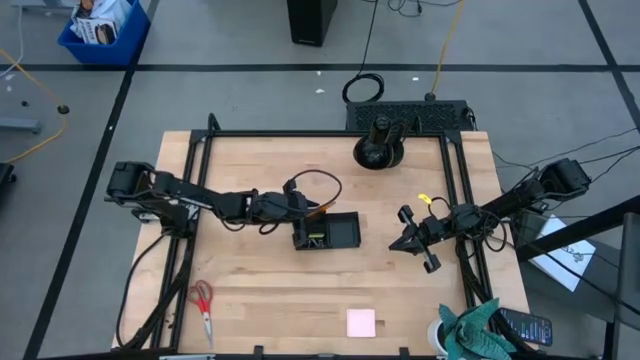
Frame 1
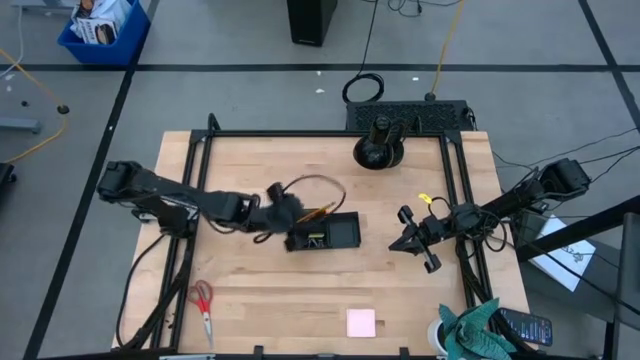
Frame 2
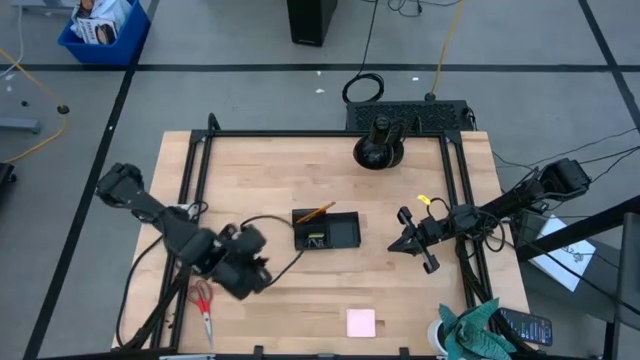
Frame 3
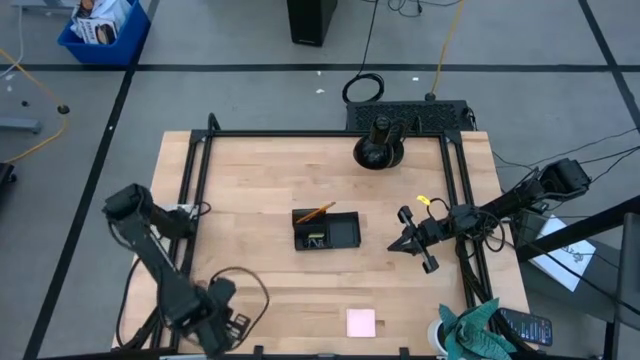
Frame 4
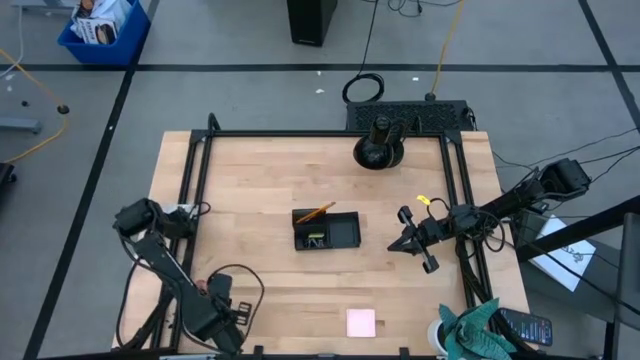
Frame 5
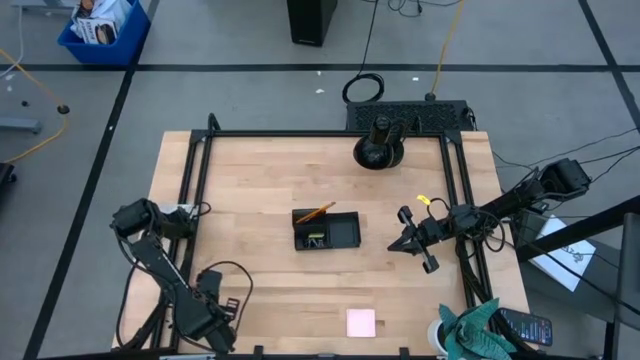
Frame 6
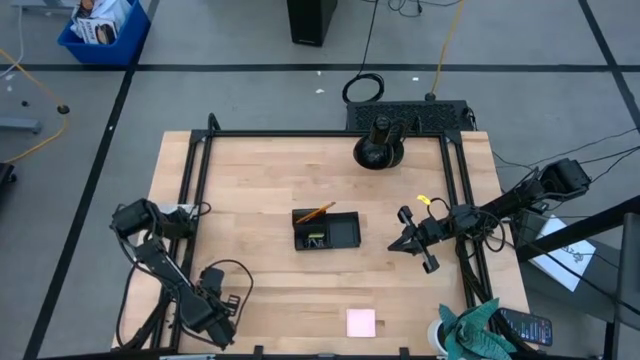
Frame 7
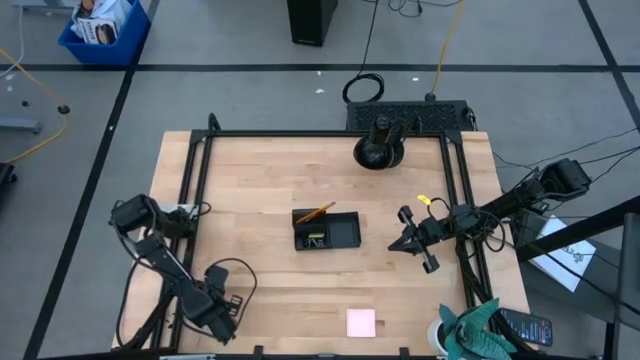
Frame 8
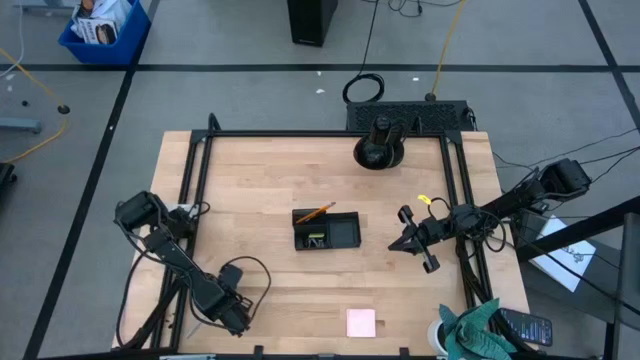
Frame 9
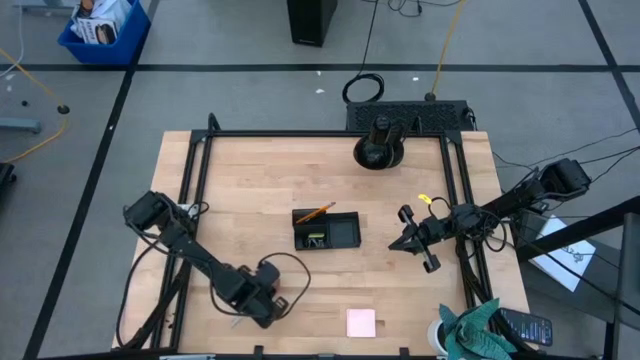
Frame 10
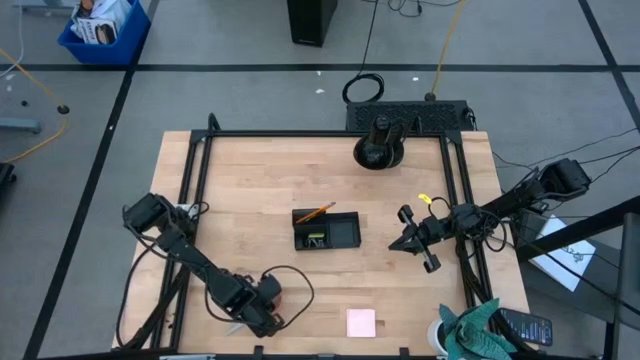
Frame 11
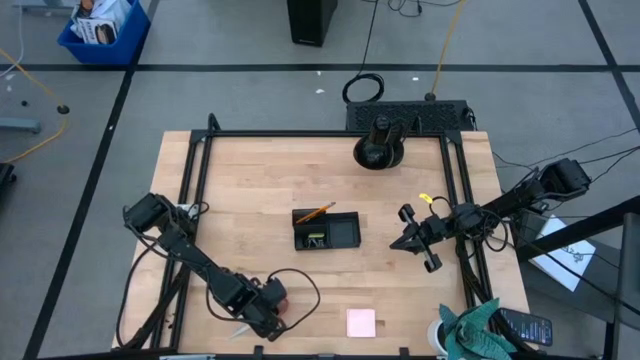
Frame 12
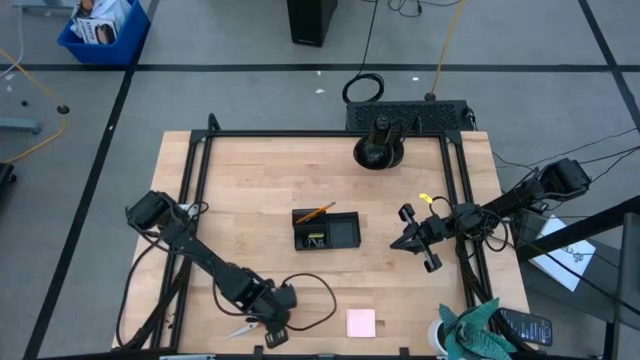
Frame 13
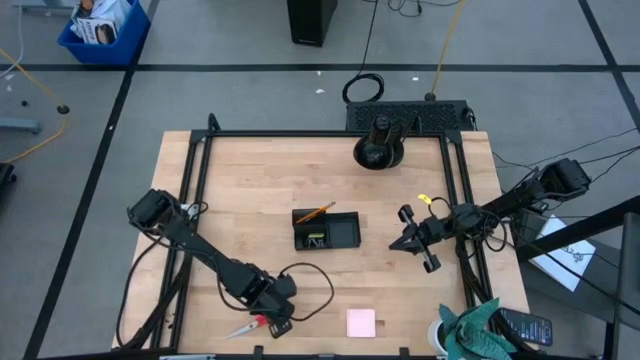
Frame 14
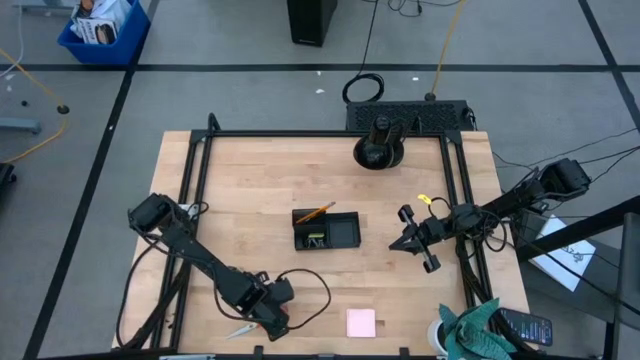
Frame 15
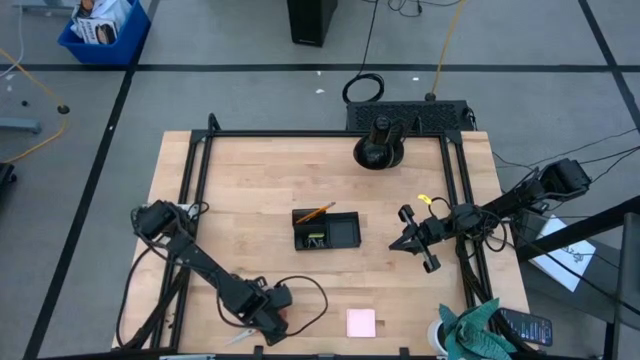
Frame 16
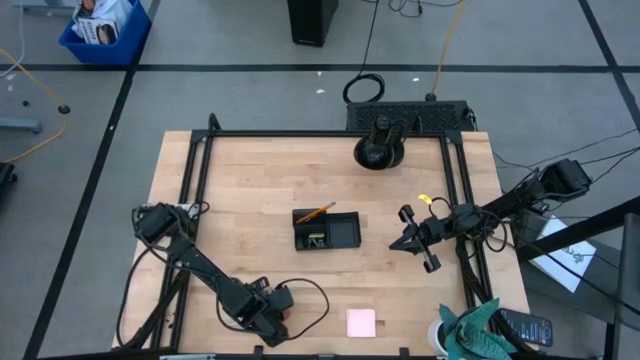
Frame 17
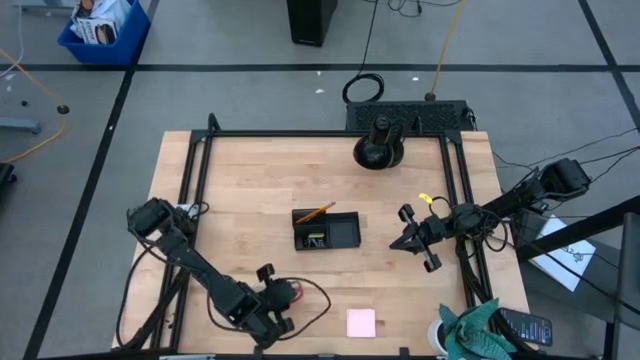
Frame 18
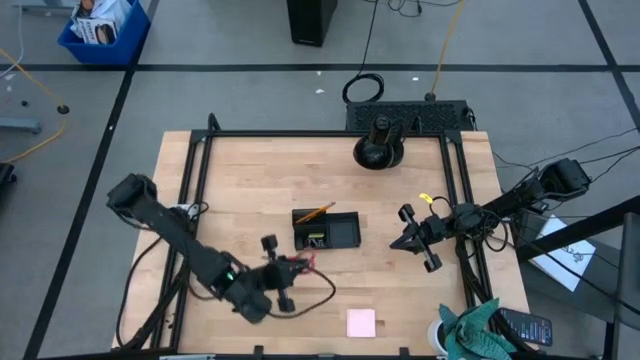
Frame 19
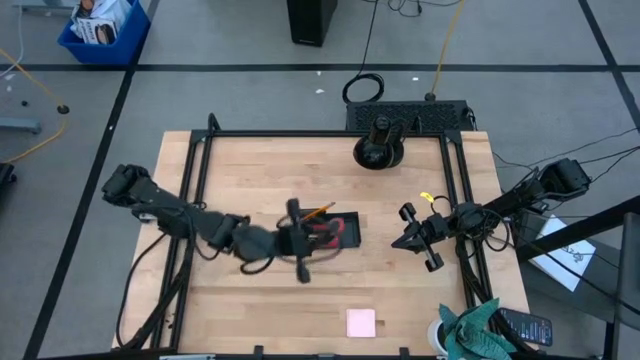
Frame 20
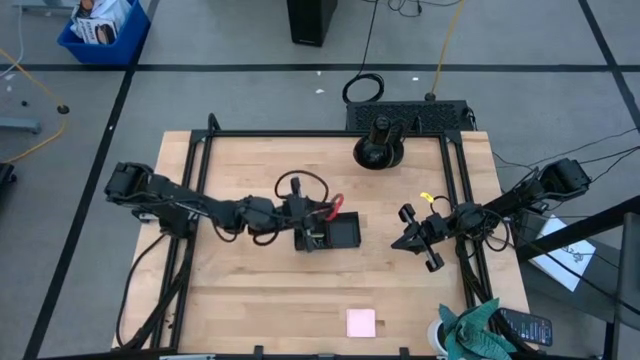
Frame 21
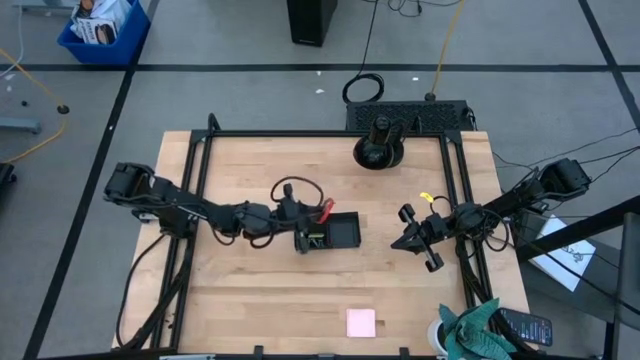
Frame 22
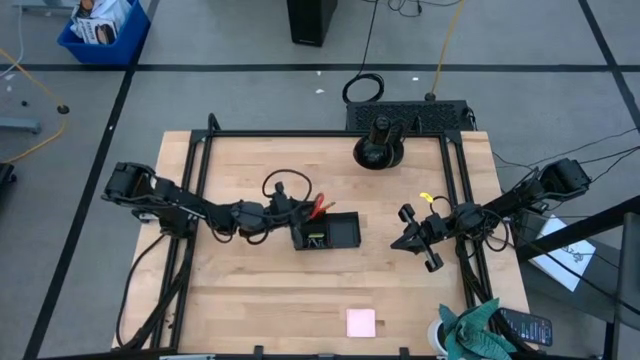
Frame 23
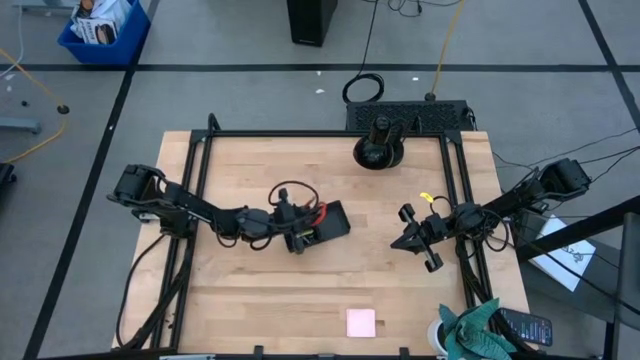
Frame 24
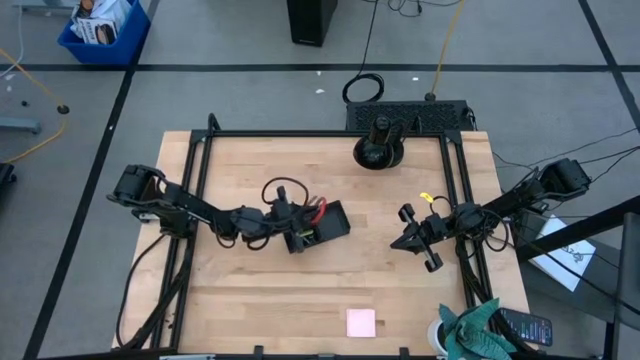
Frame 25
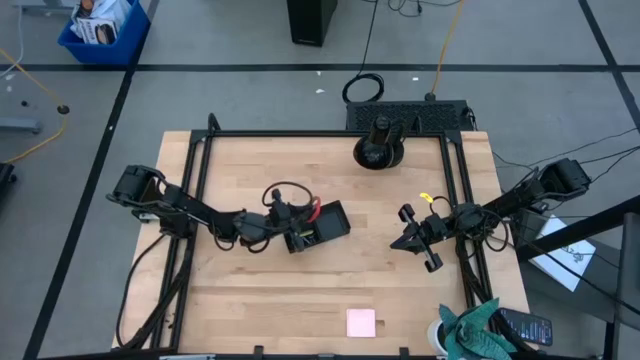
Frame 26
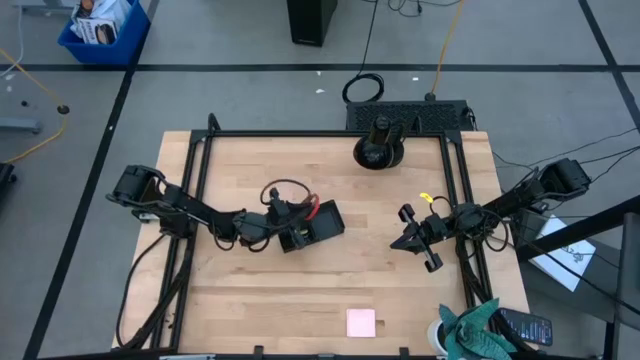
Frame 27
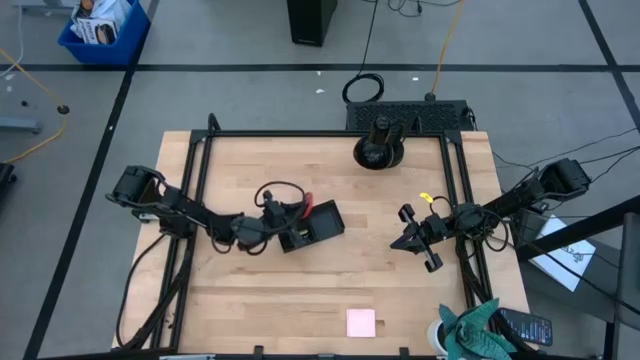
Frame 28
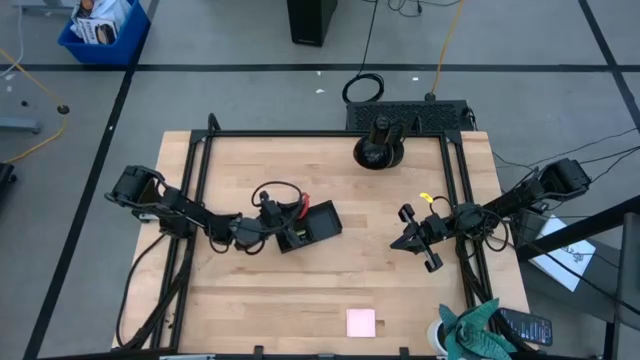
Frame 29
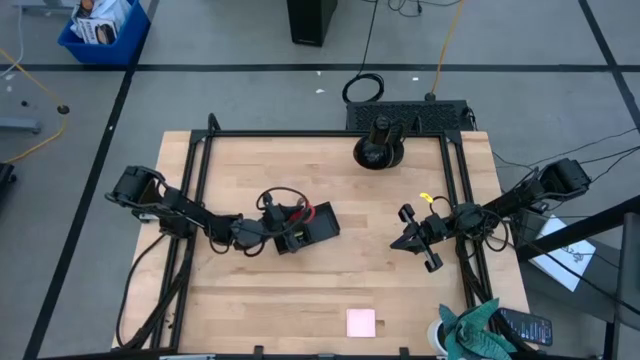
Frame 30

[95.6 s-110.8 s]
Task: Pick and place office supplies into organizer
Put the red scissors into the black desk organizer

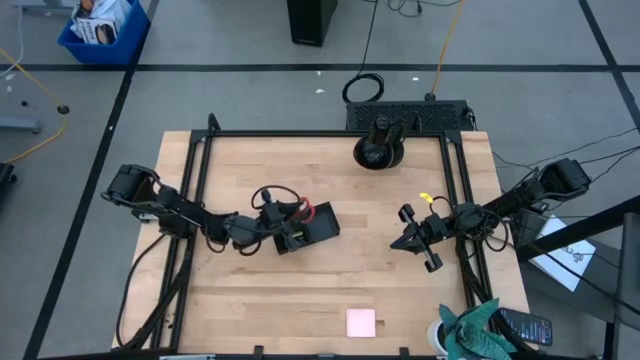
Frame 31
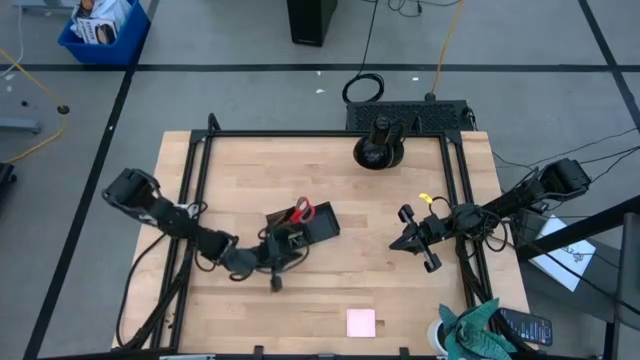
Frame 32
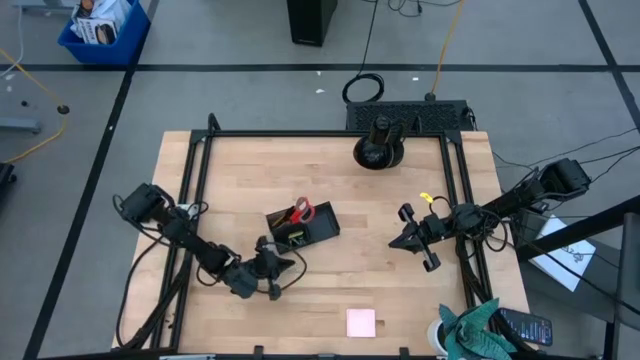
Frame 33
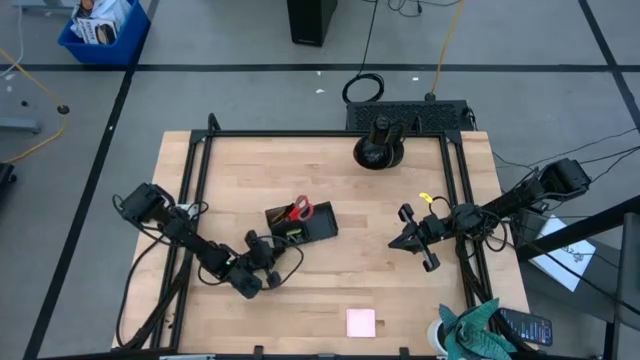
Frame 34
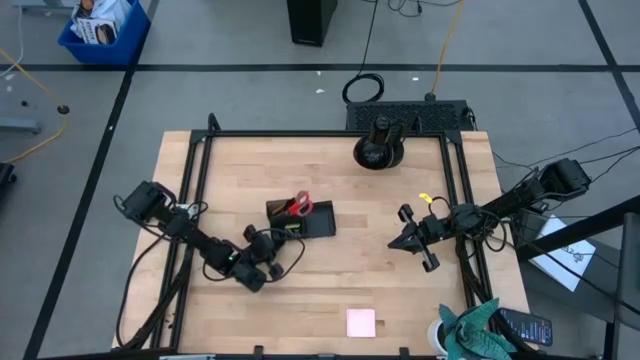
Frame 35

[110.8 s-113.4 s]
Adjust the black desk organizer

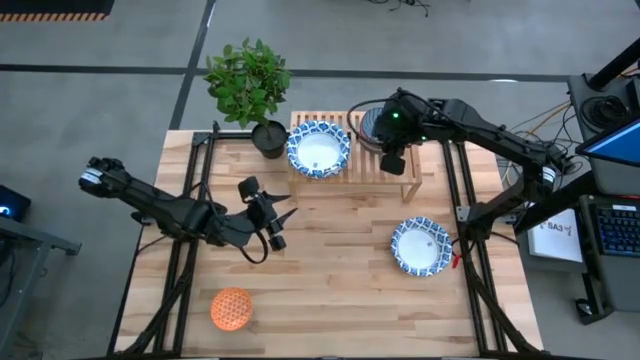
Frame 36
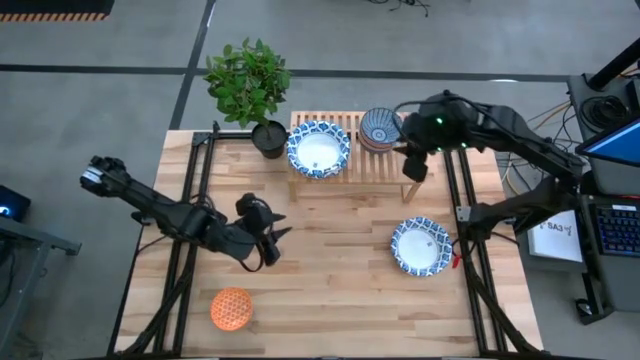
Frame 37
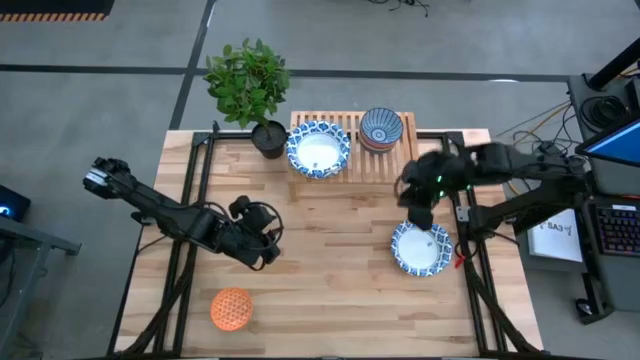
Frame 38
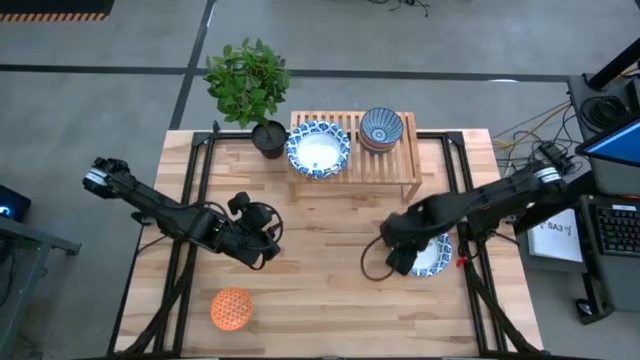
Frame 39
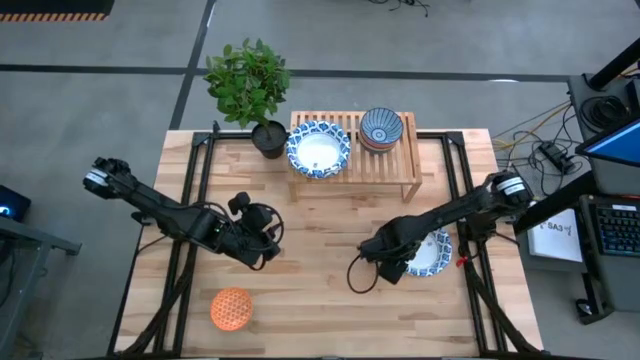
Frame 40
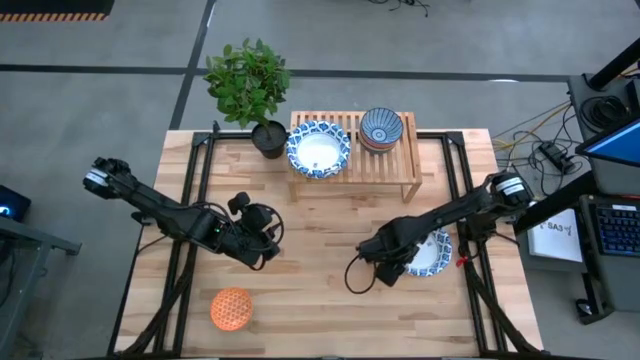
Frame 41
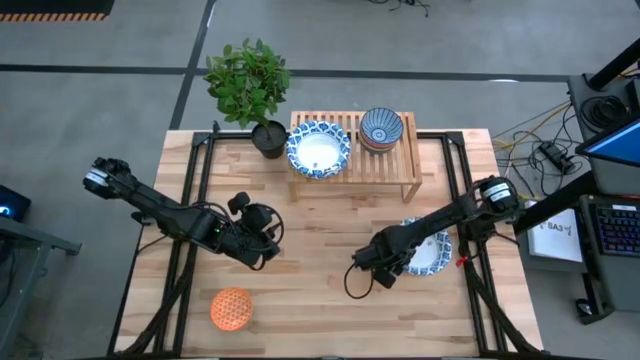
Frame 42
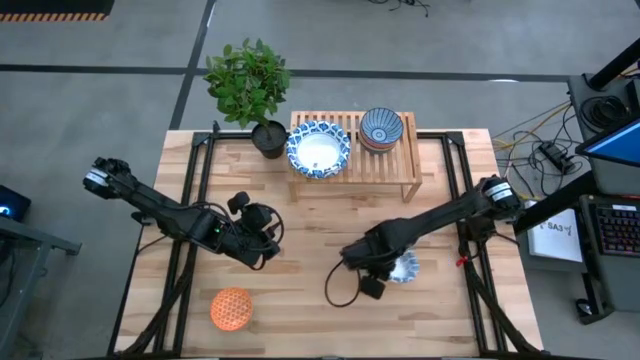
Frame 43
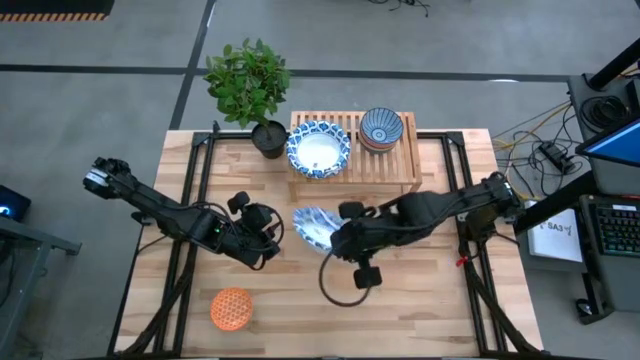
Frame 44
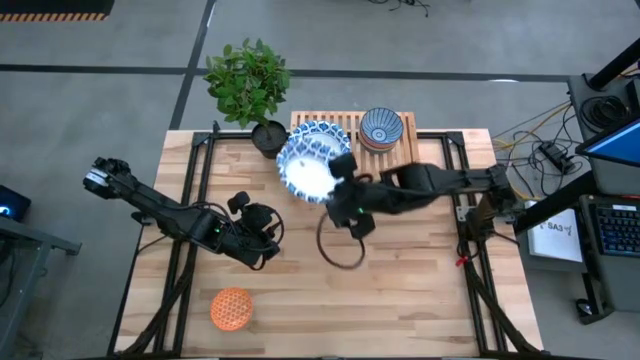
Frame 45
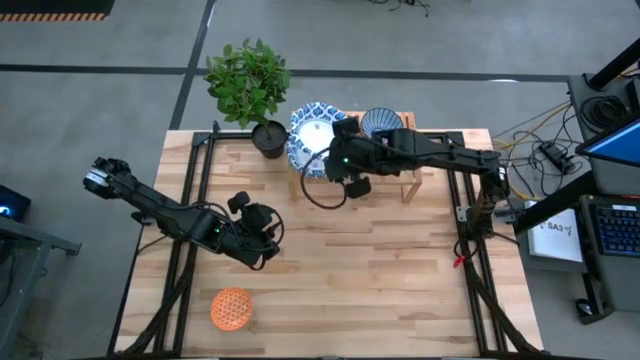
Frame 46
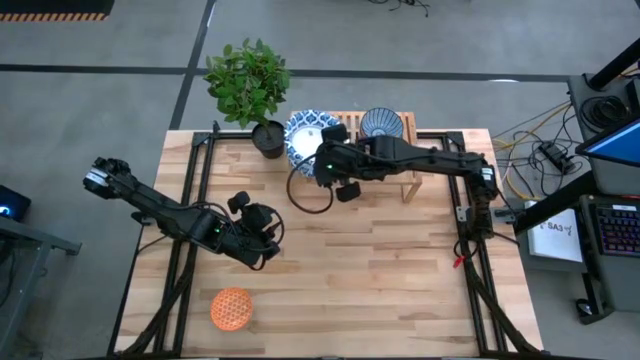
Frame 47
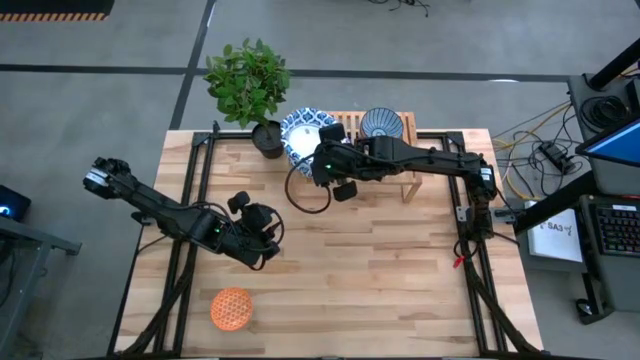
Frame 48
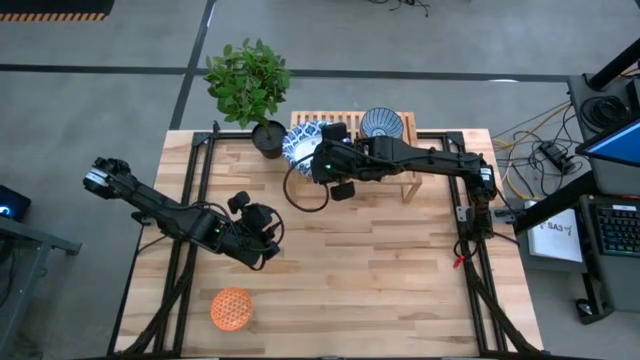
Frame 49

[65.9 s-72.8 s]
Task: Place and stack bowls onto a shelf
Stack the blue pattern bowl on top of the other blue pattern bowl on the shelf
